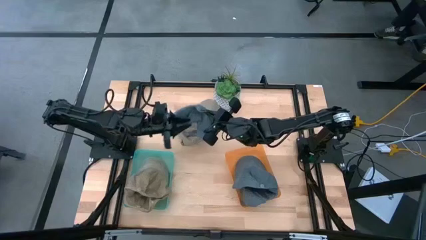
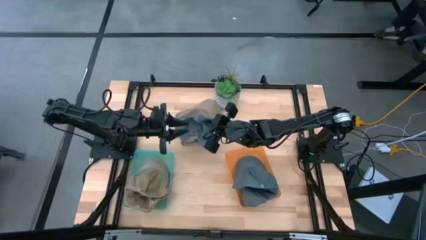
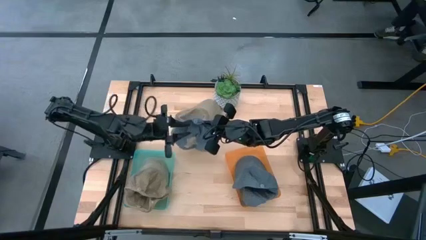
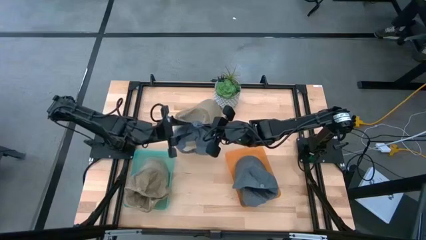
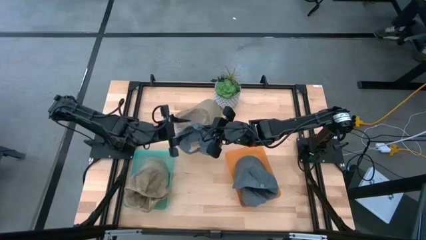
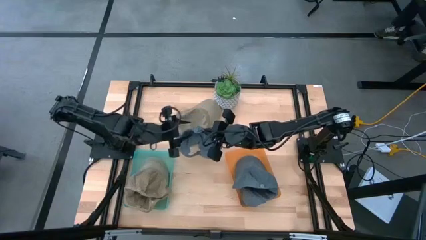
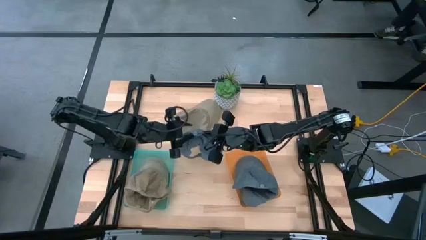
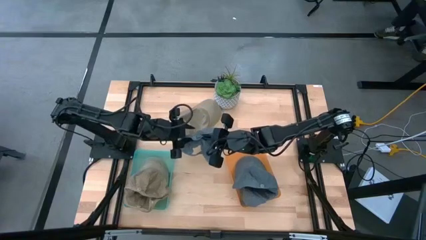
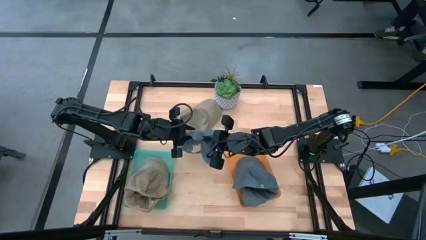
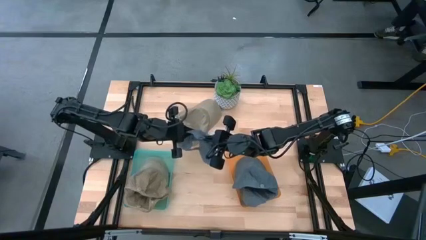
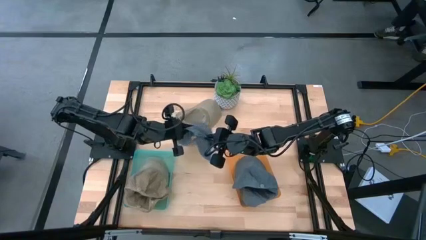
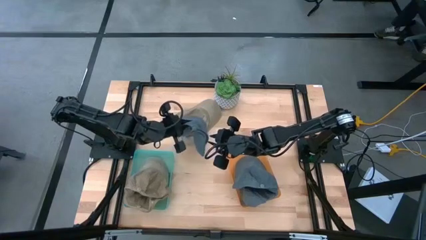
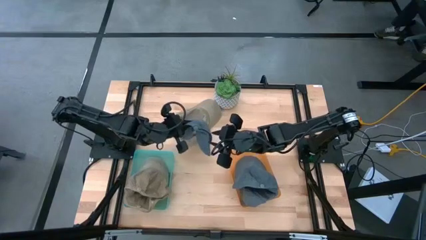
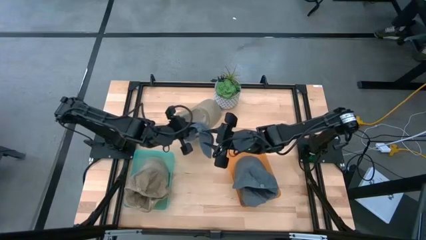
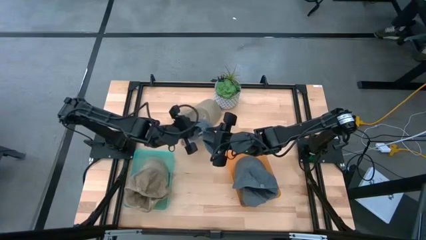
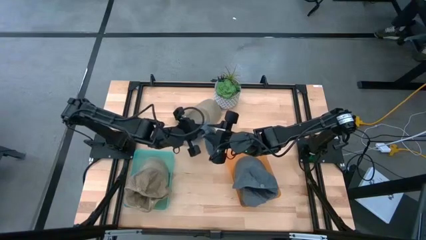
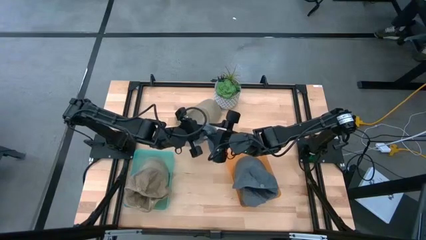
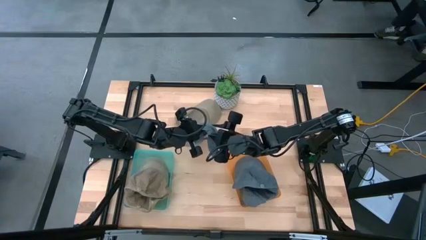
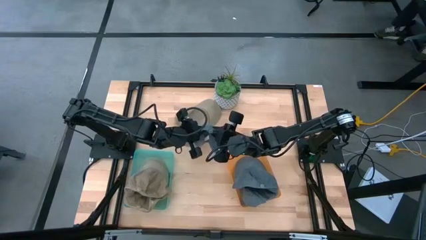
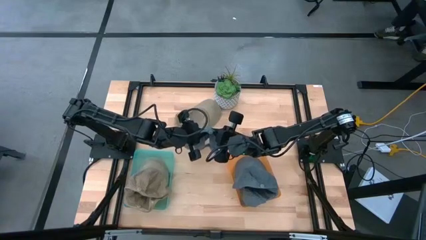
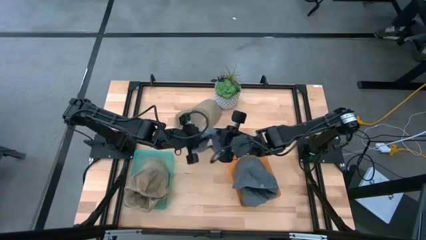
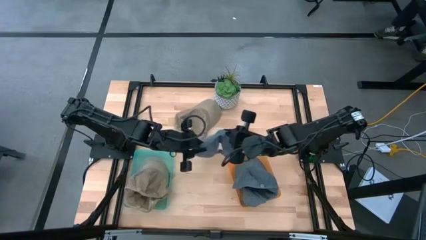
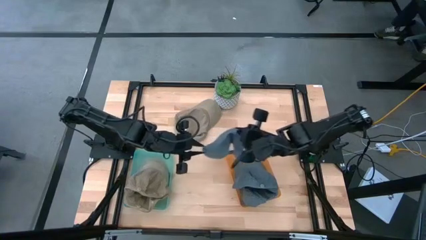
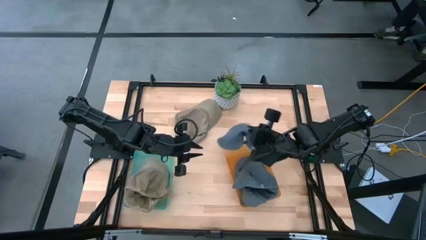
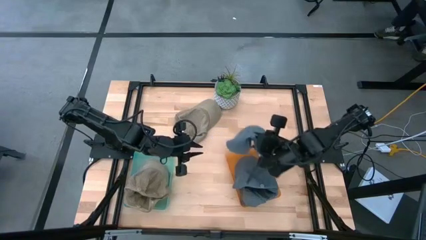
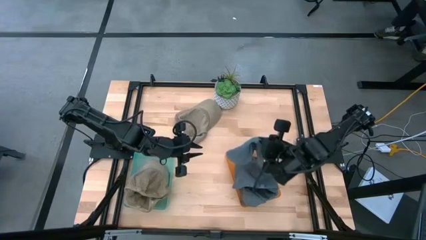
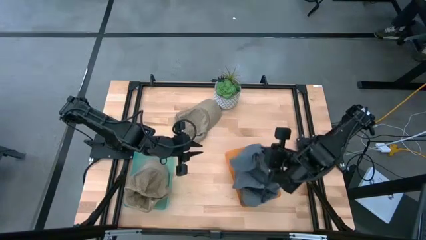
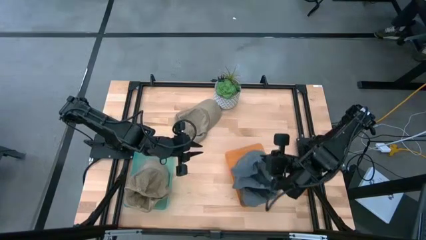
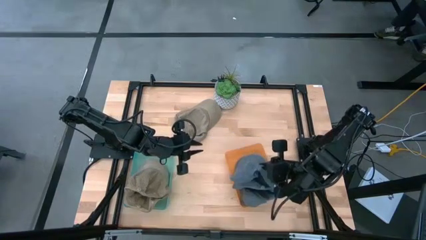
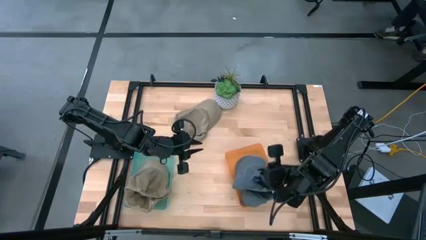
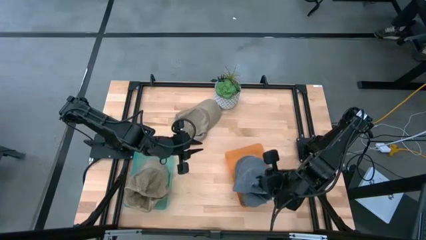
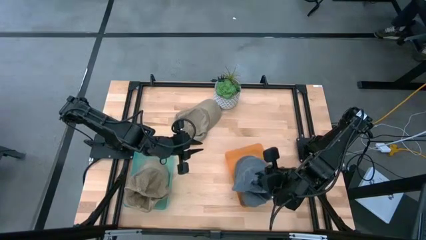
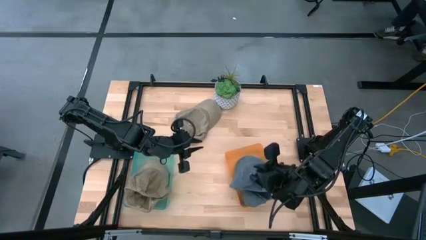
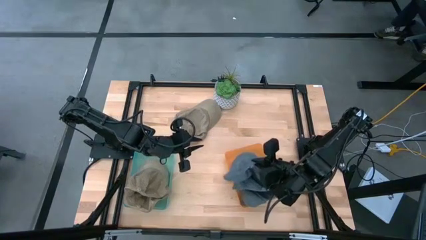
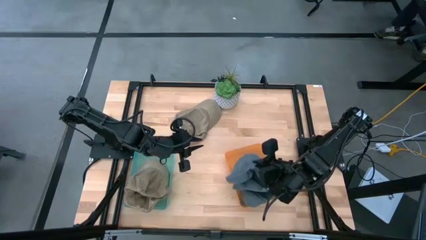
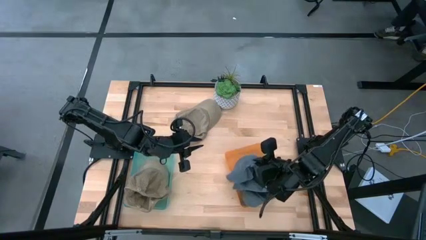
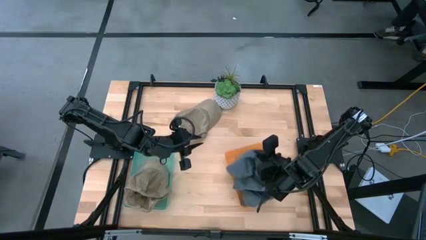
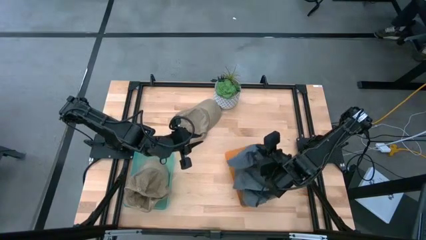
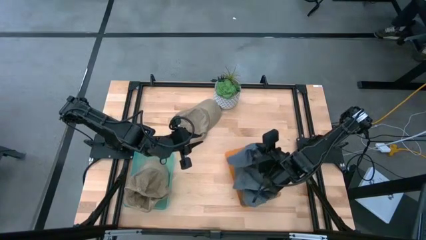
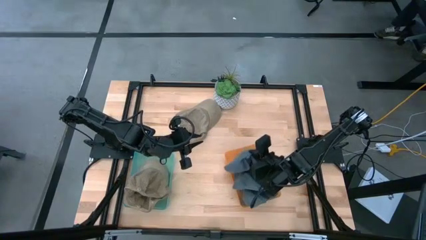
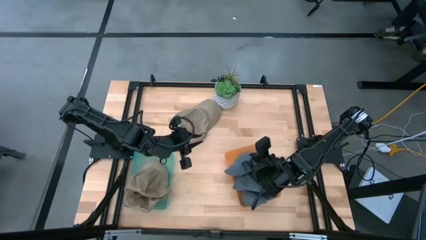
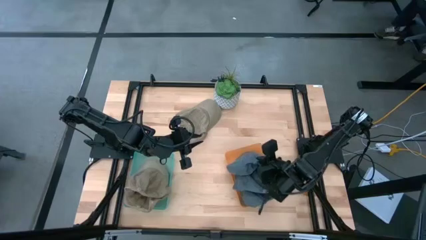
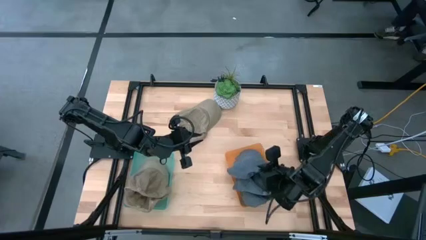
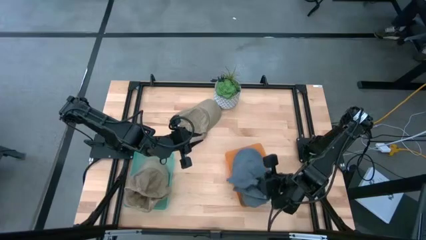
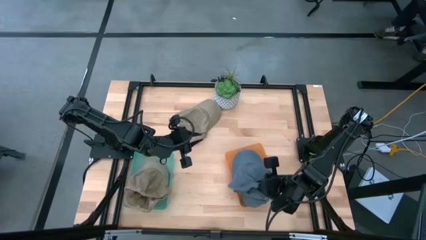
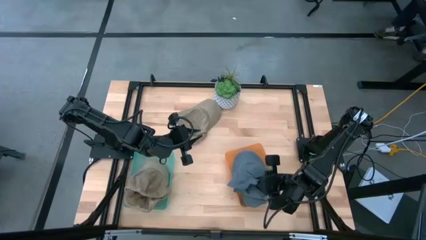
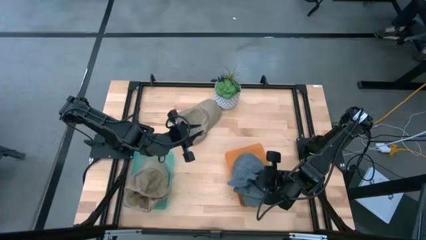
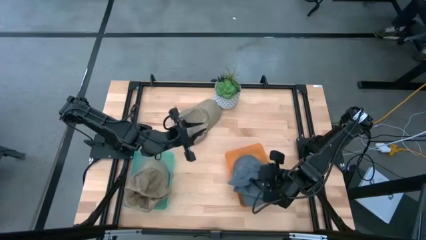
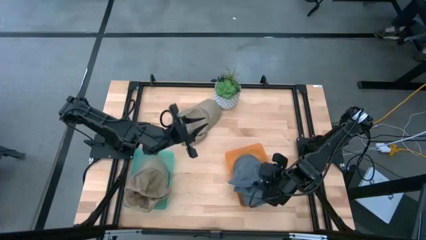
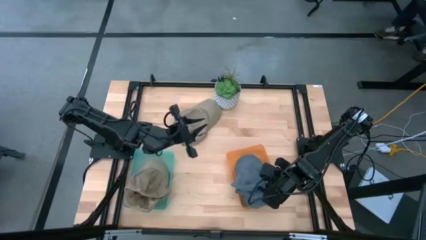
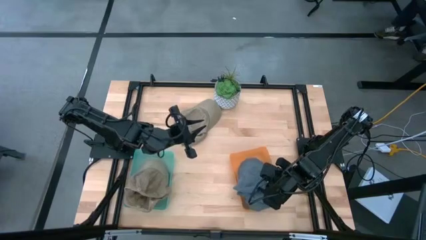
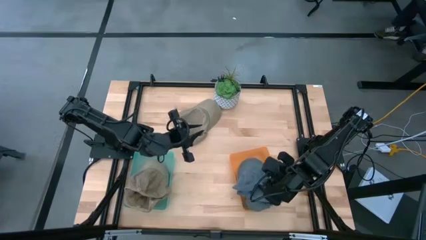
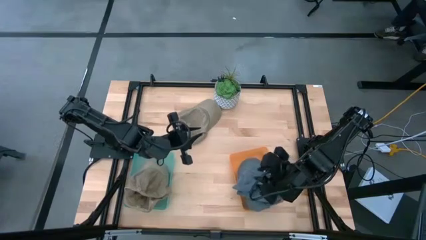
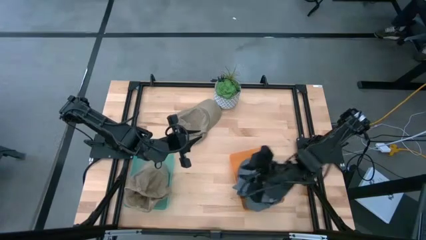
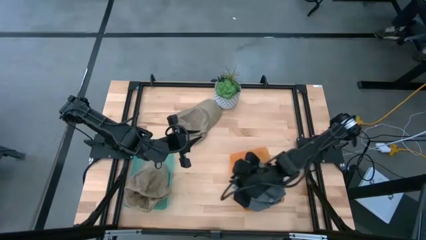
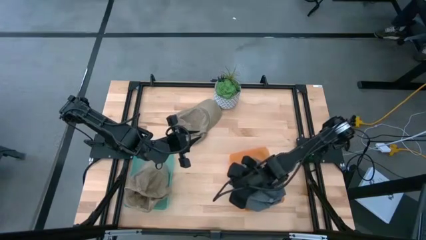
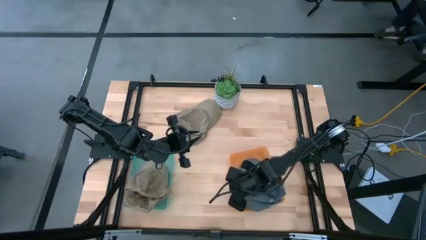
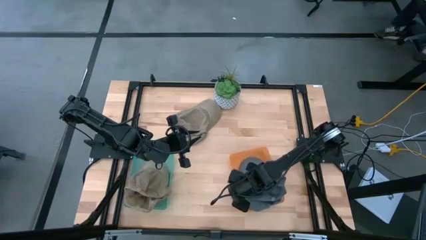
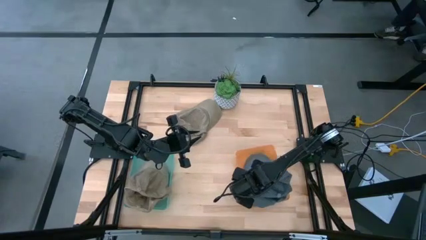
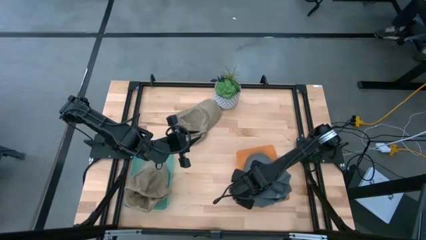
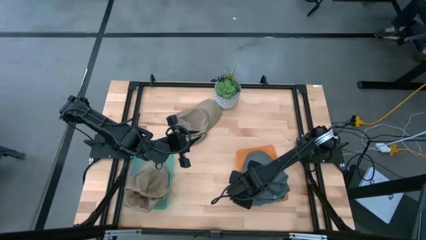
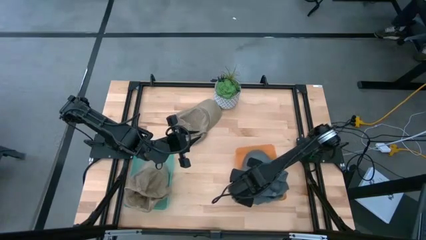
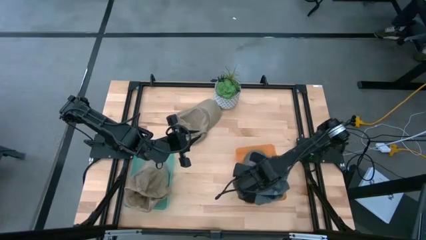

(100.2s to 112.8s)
Task: Pick & Place hat
Put the blue cap into the orange bin

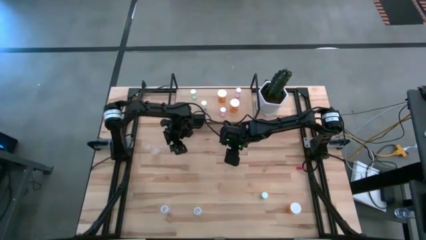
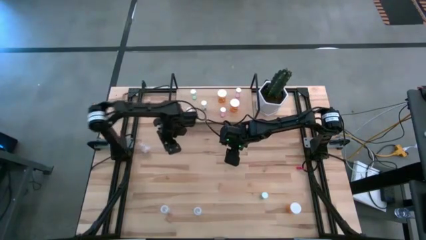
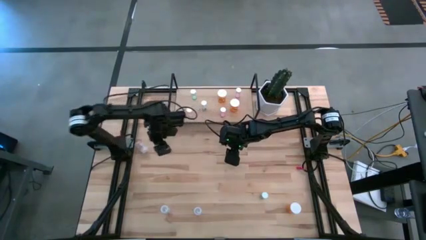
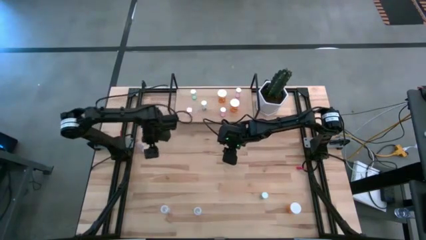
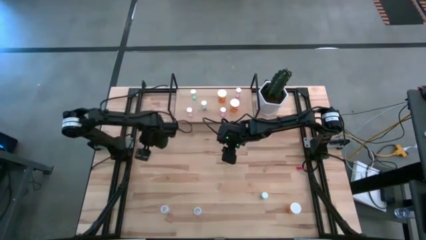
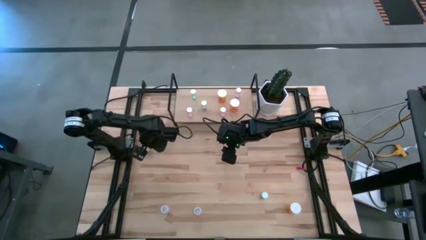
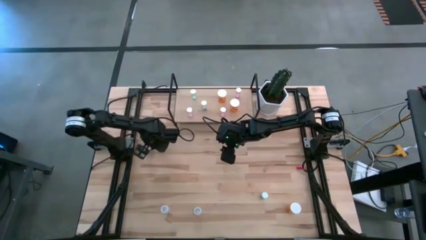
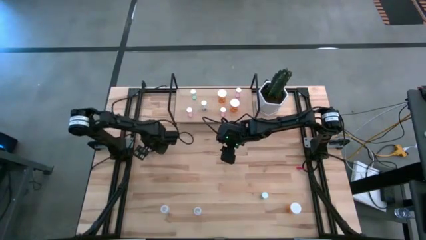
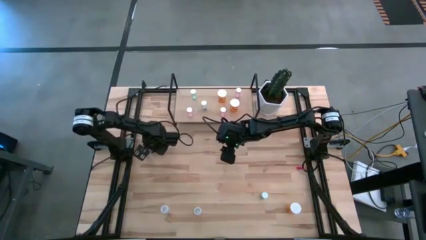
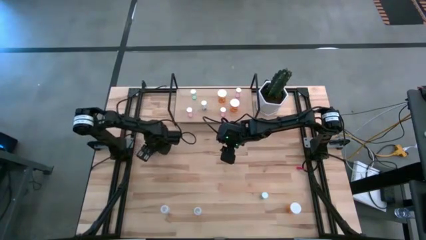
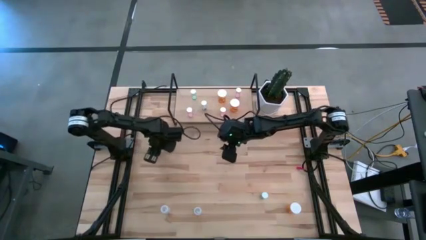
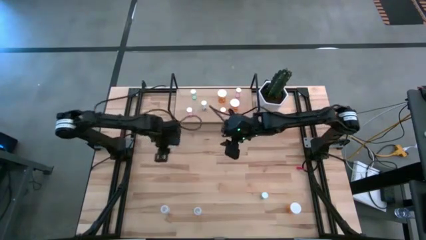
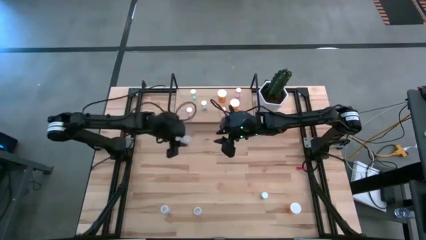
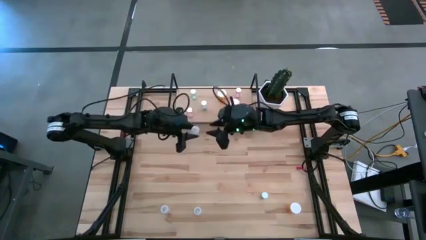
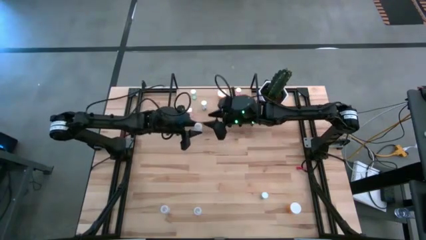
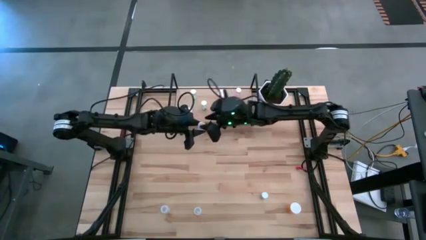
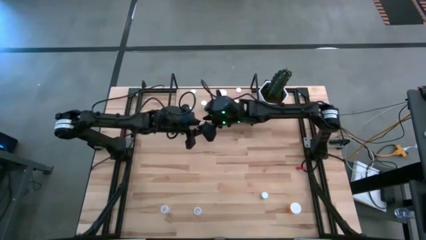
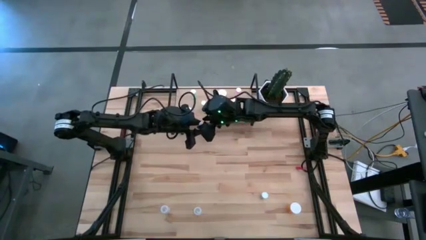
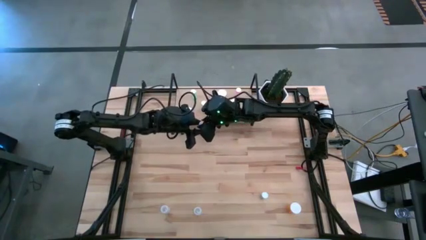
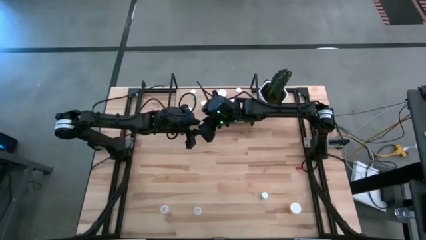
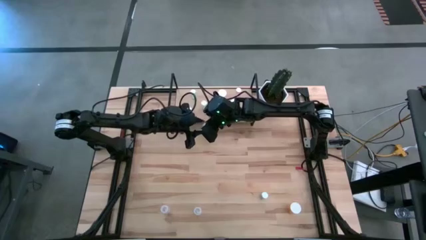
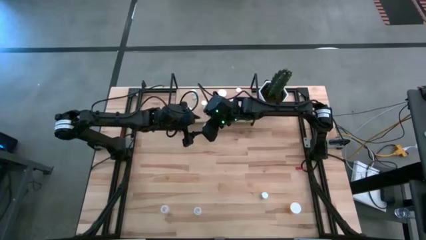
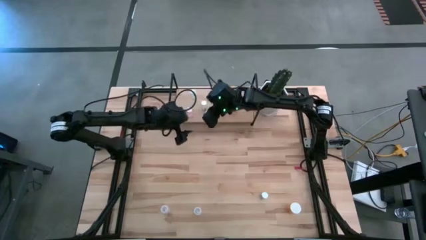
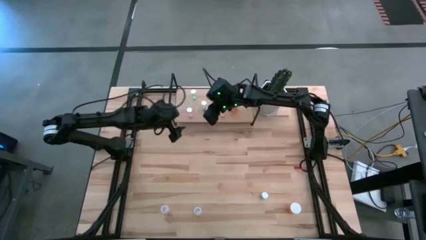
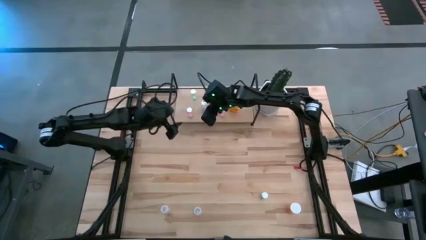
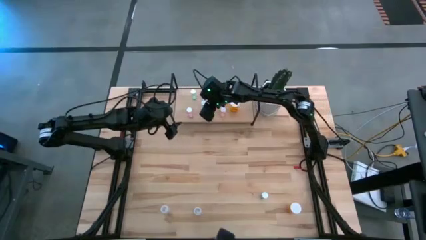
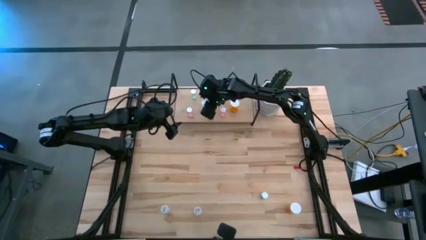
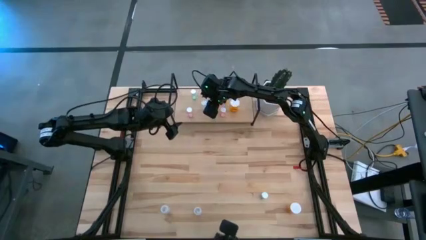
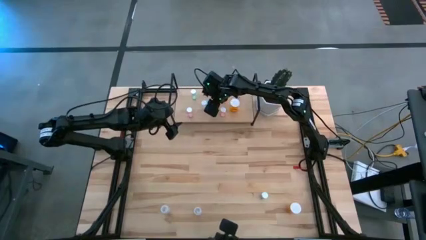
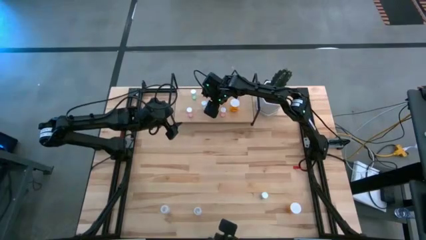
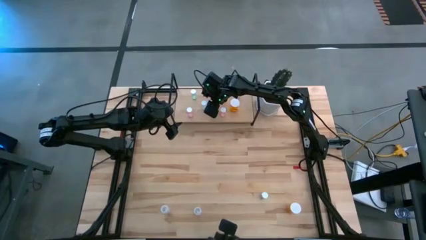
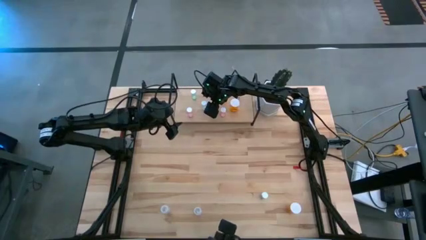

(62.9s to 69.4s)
Task: Pick and place medicine bottles onto shelf by color
Adjust the transparent pill bottle on the shelf
